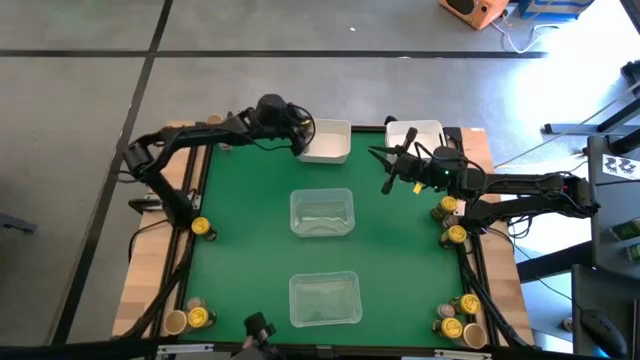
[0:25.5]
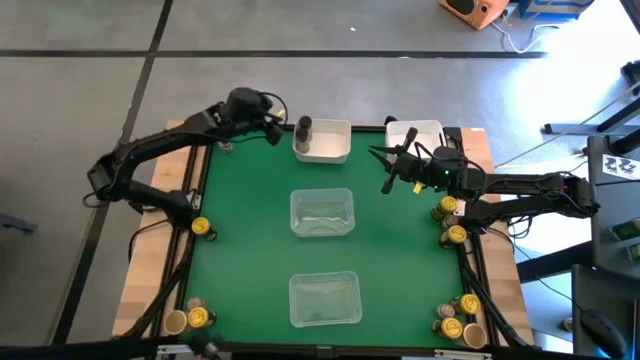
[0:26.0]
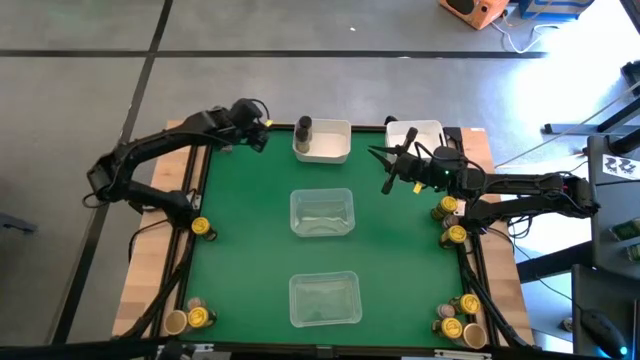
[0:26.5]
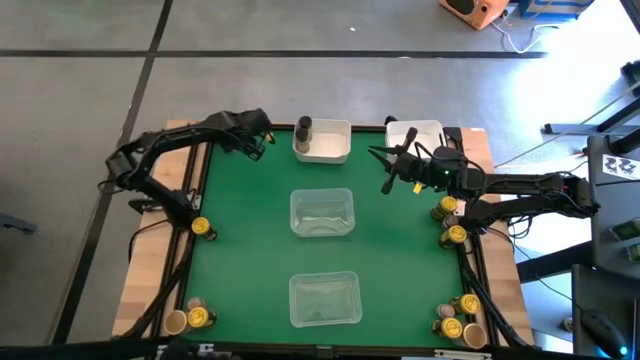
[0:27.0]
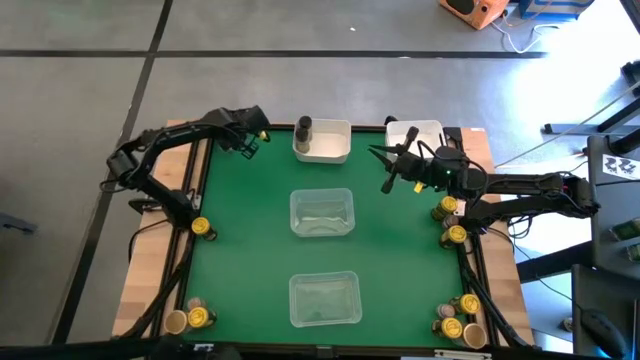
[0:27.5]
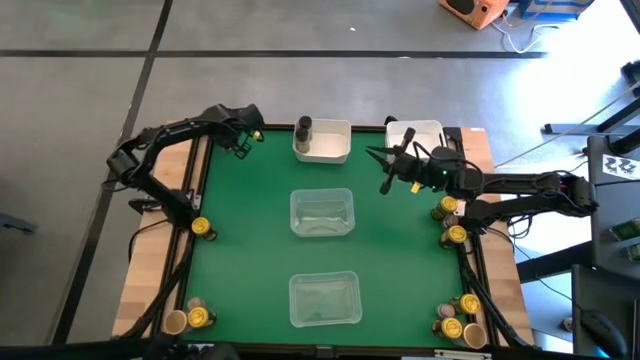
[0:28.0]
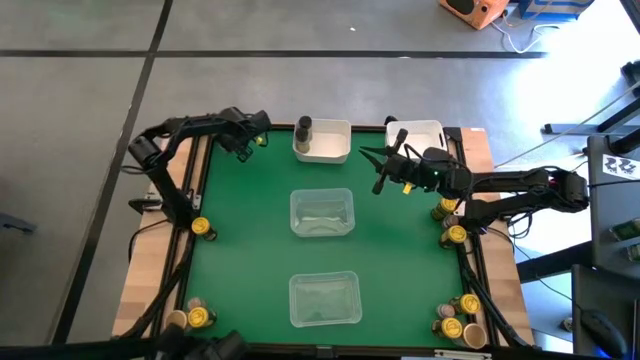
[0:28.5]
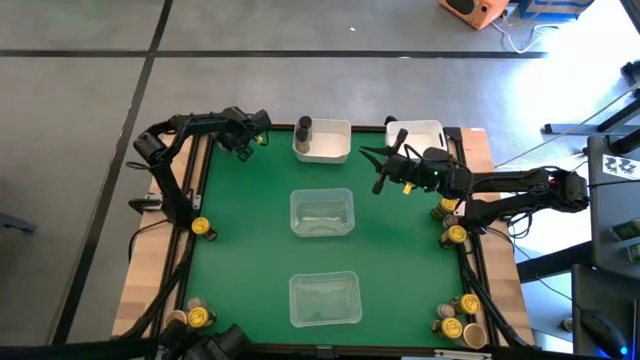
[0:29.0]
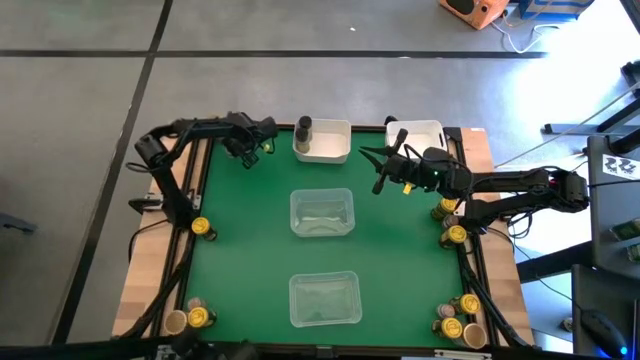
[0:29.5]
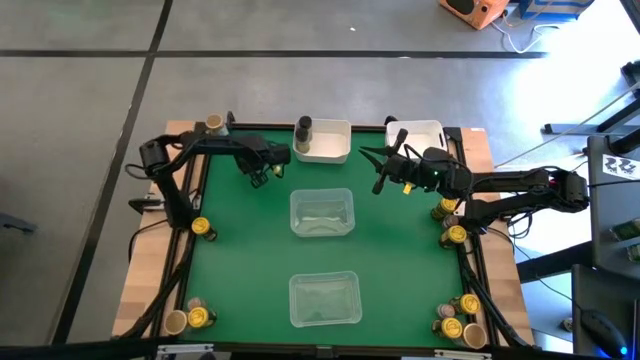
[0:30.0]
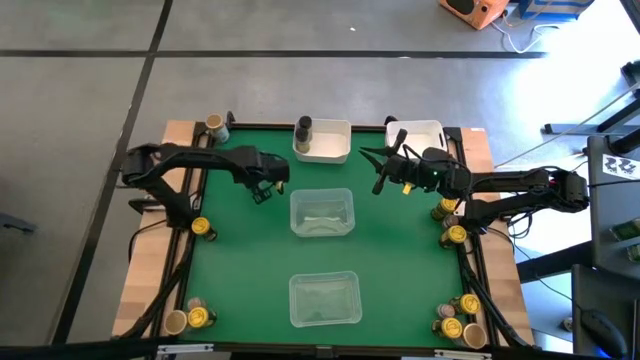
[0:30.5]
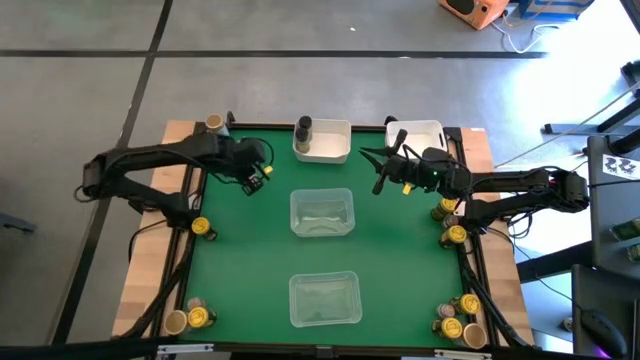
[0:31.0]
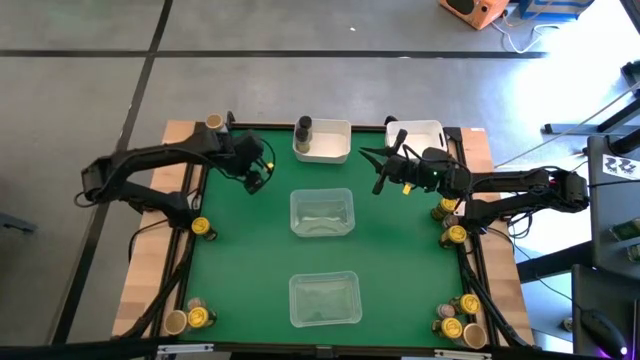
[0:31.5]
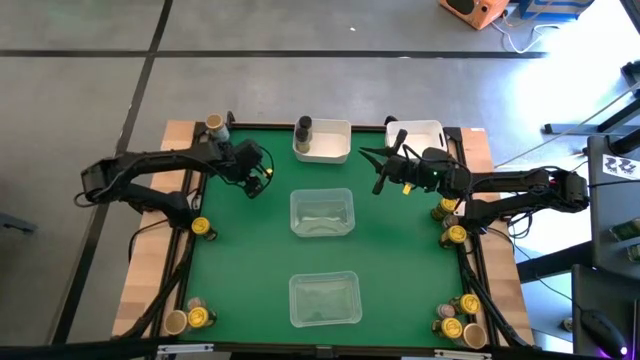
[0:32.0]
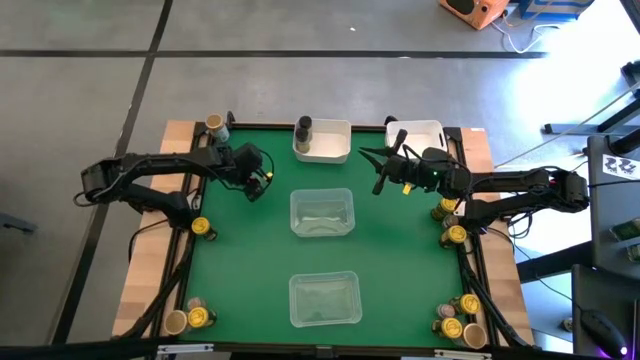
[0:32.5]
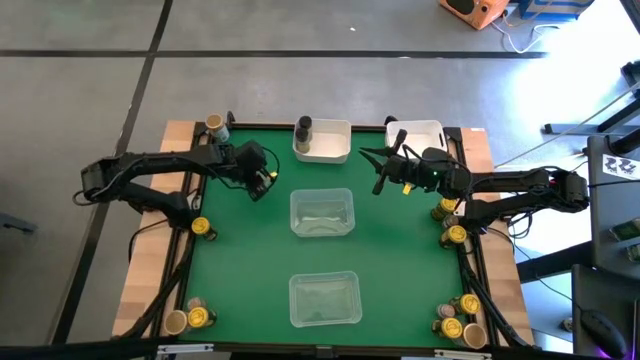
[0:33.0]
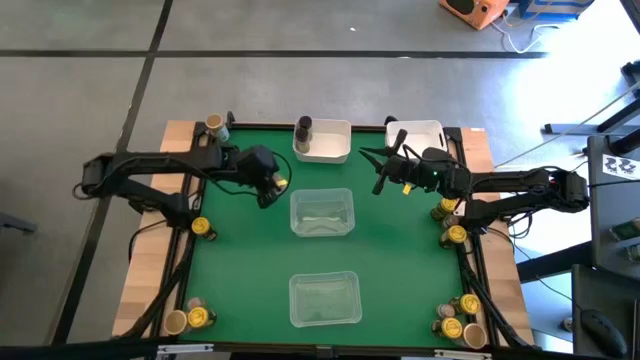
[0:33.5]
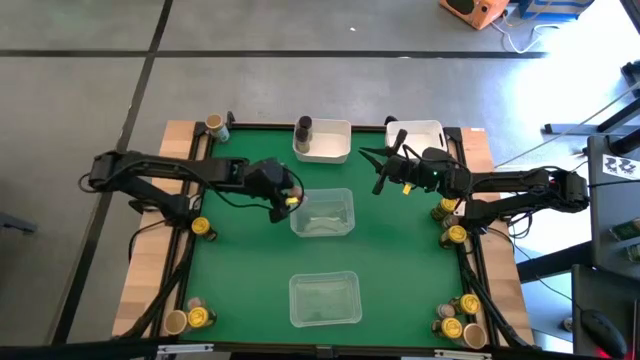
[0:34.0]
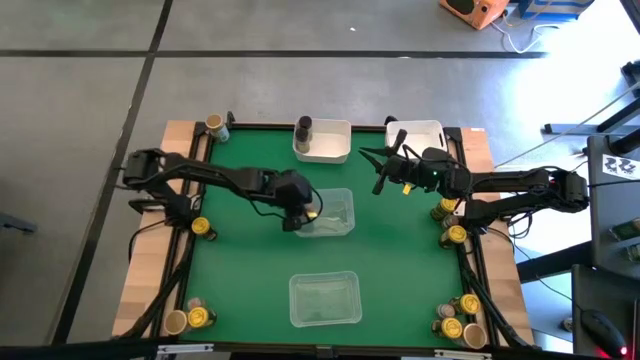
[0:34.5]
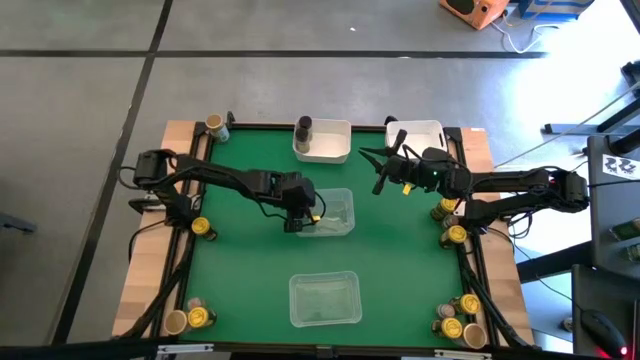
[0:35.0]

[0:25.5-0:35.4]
Task: Sort spices by type
Put the top left transparent seasoning bottle into the center transparent bin

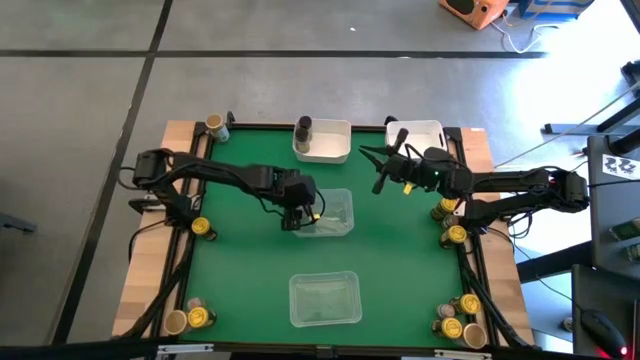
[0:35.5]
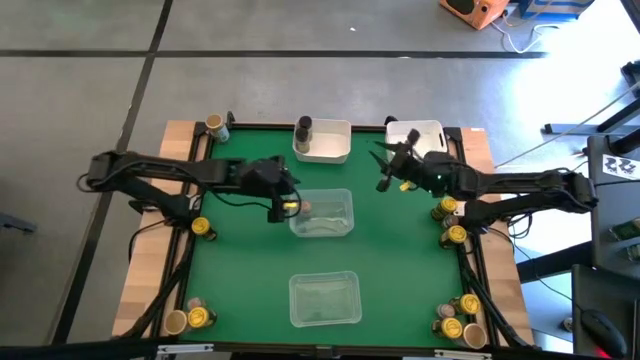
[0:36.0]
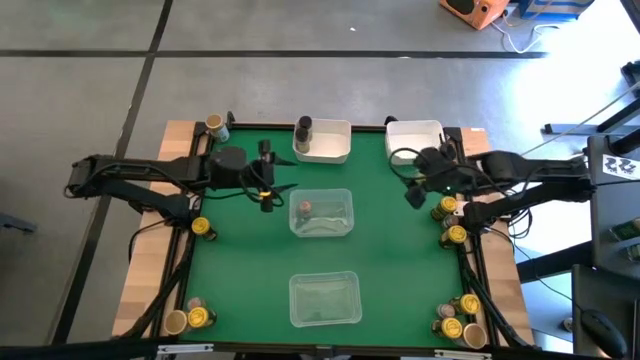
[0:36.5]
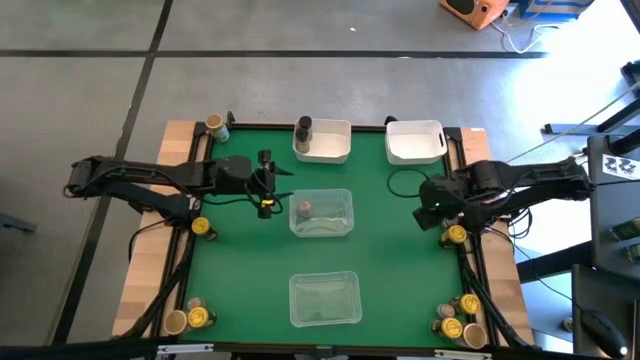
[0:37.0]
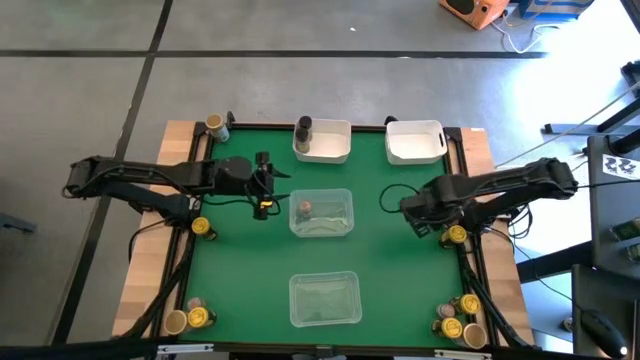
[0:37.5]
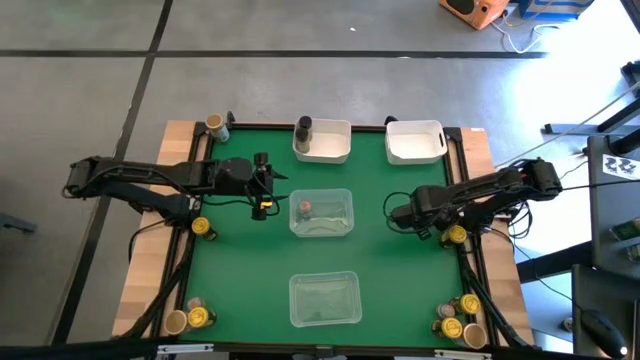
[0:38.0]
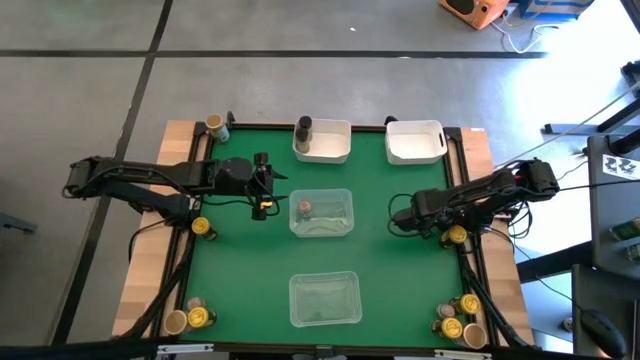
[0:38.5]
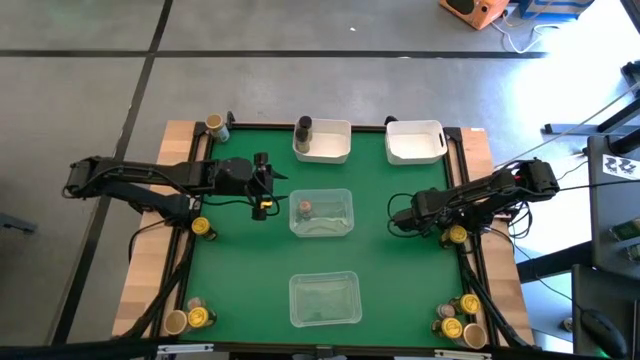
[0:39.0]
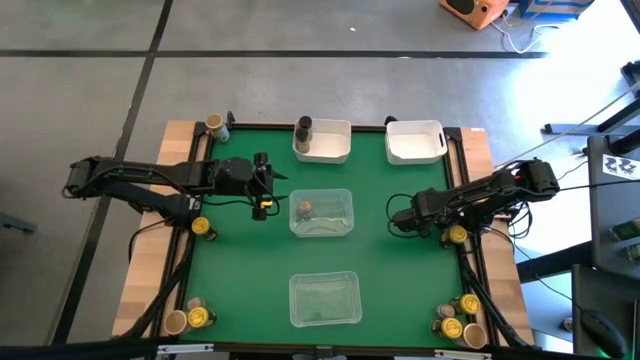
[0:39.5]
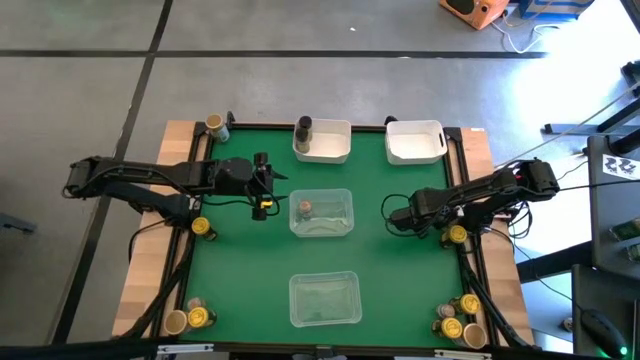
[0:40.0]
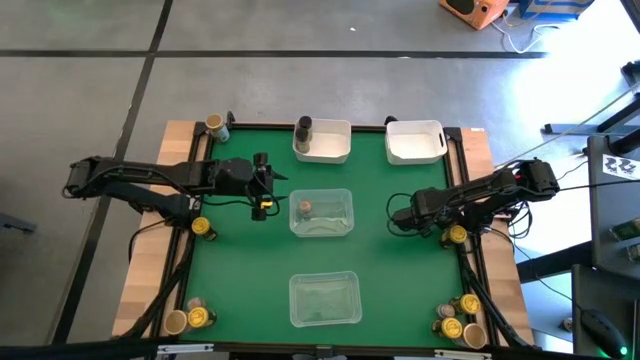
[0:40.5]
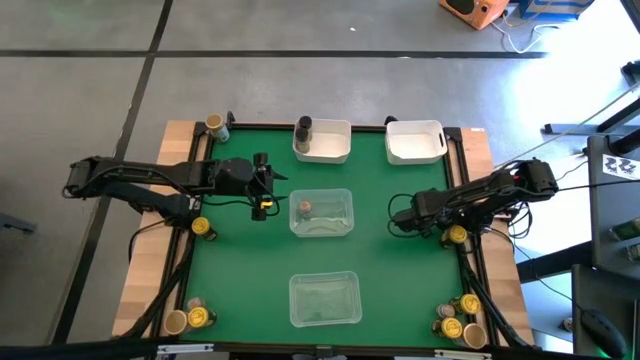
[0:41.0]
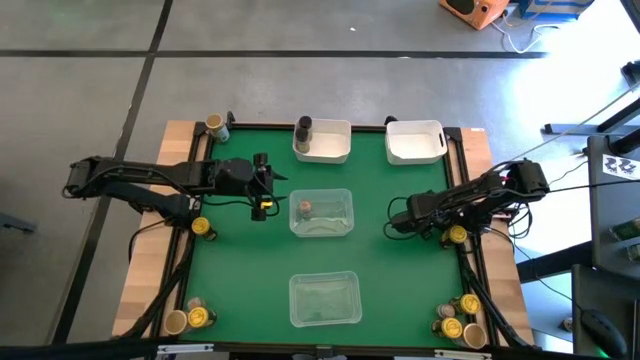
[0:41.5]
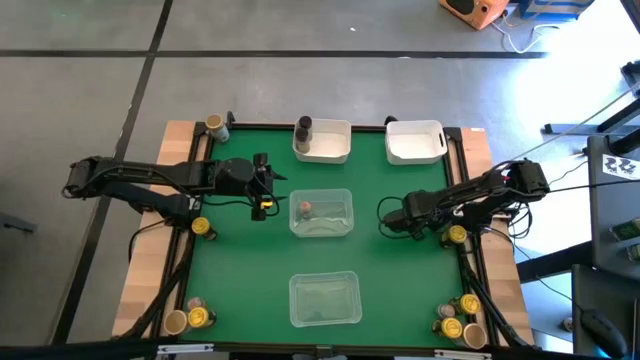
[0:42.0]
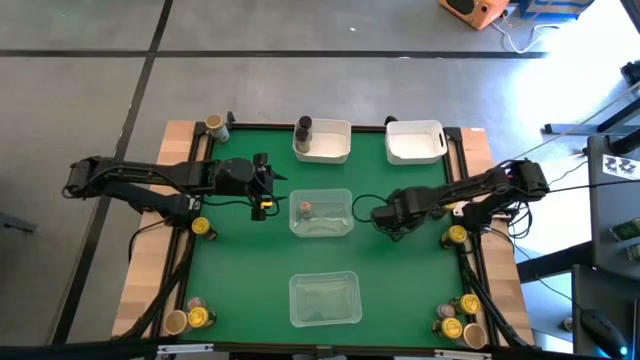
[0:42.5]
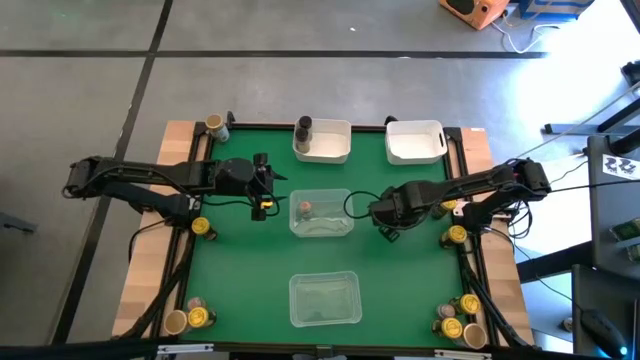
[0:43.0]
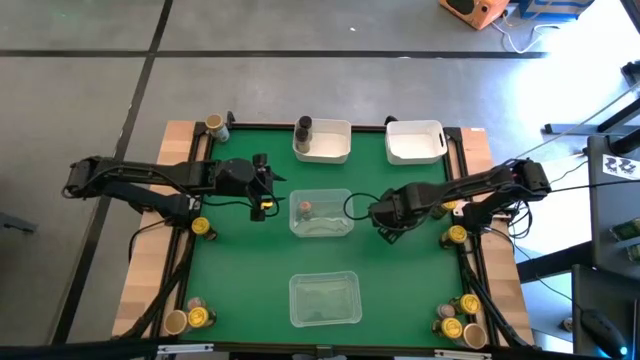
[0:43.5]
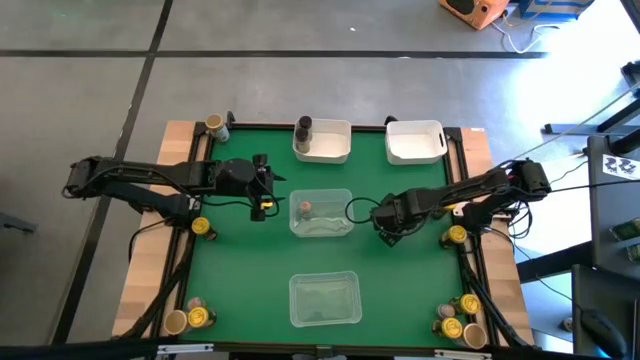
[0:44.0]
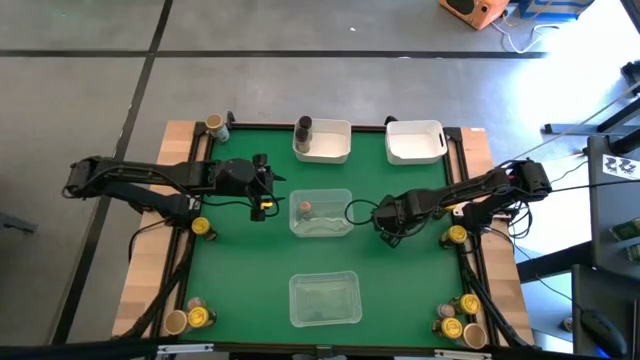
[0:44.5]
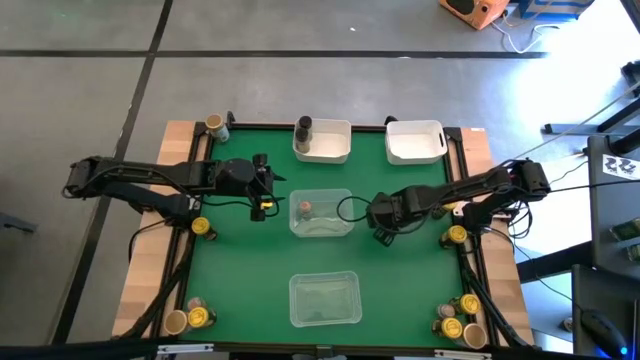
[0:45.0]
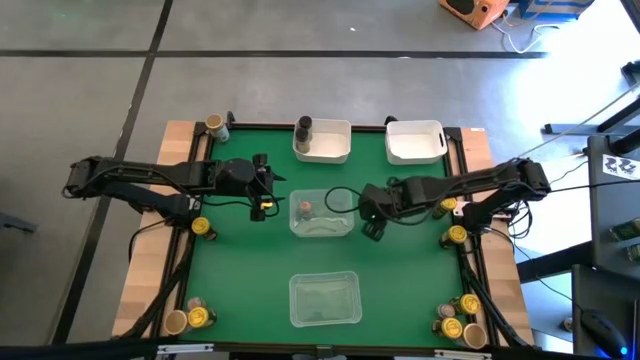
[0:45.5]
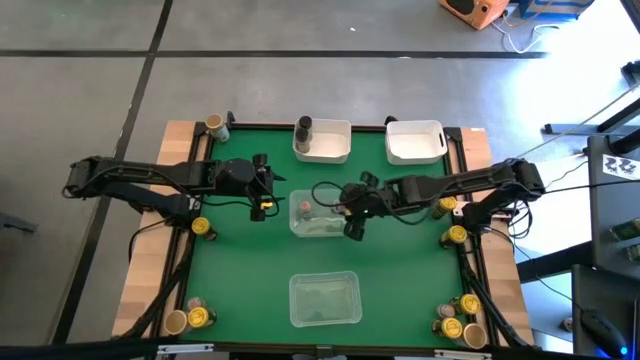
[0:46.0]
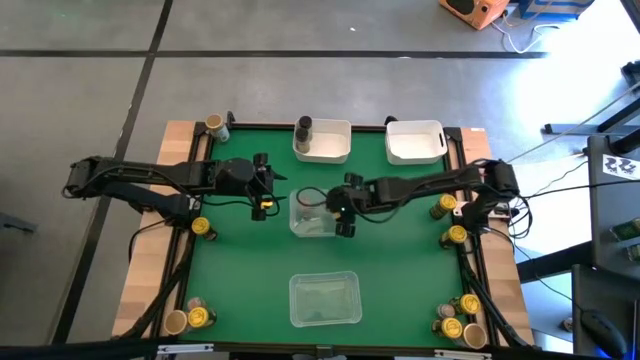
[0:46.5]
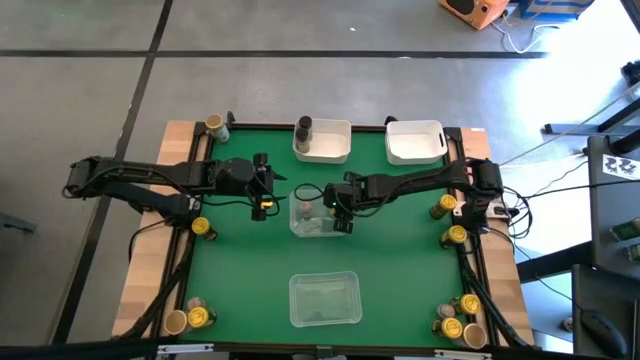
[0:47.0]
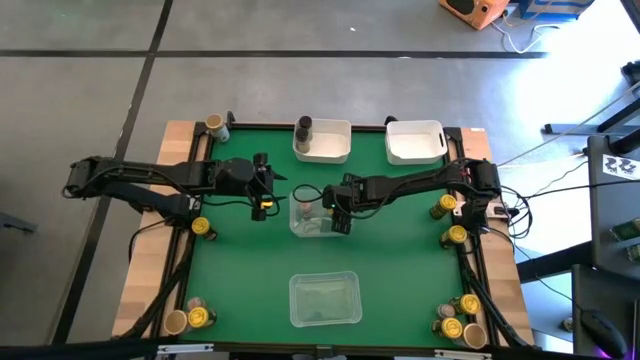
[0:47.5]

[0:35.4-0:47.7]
Put the middle right transparent seasoning bottle into the center transparent bin

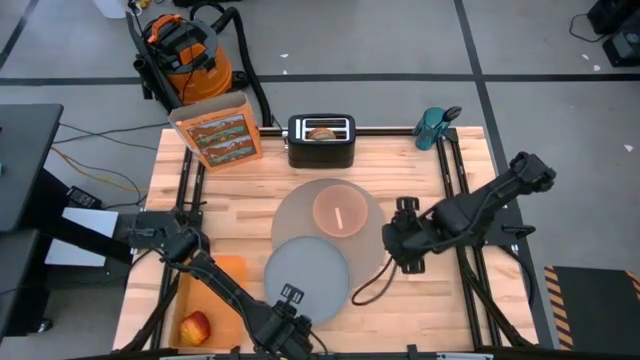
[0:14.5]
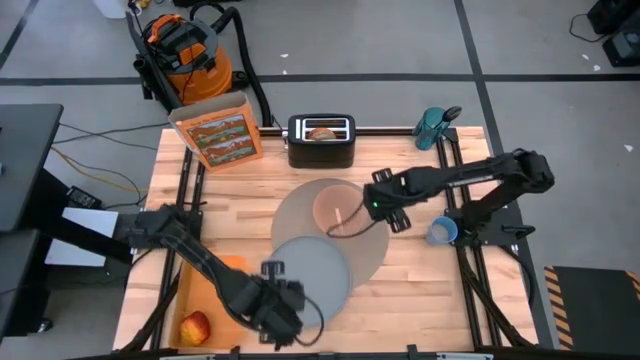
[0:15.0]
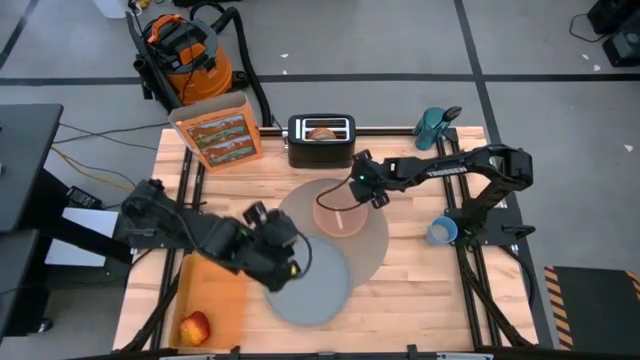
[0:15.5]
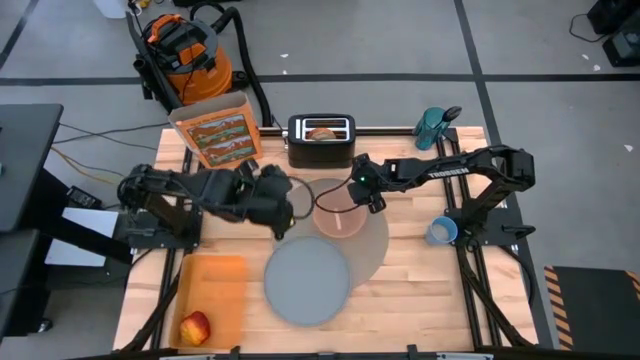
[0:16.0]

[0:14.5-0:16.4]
Task: Arrange a breakfast setting
Adjust the light orange bowl on the gray placemat
